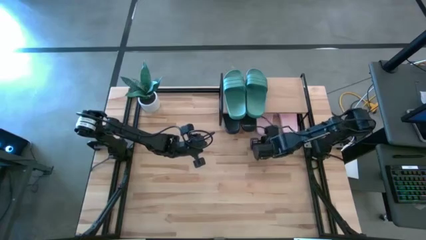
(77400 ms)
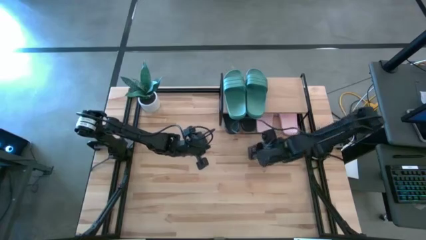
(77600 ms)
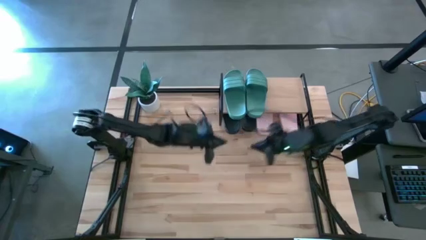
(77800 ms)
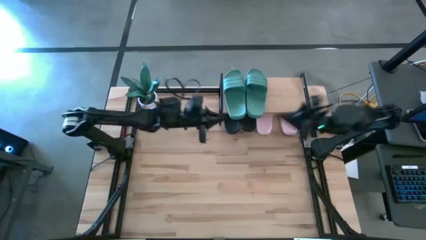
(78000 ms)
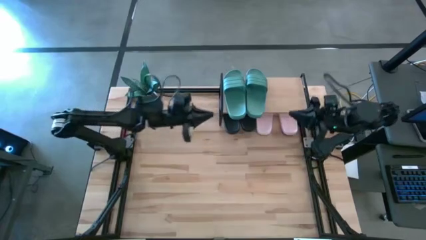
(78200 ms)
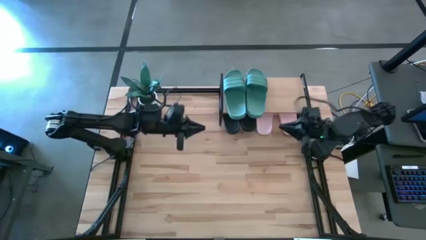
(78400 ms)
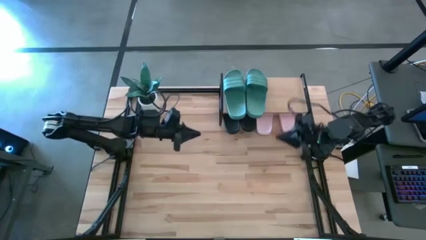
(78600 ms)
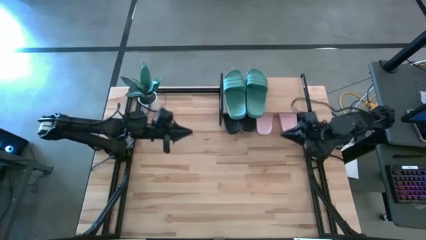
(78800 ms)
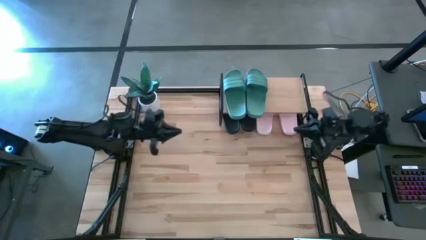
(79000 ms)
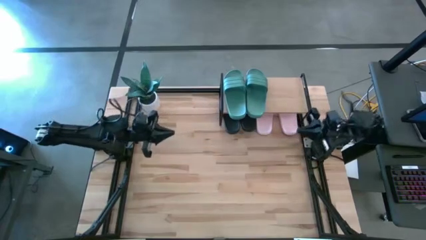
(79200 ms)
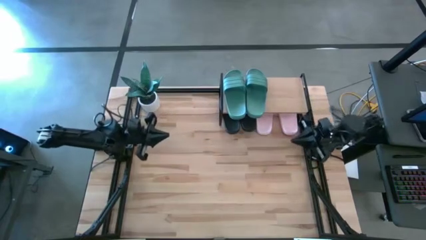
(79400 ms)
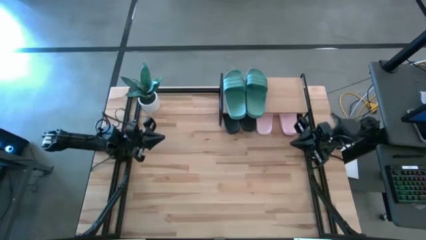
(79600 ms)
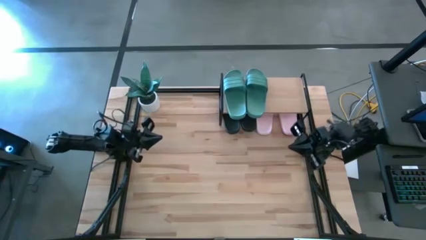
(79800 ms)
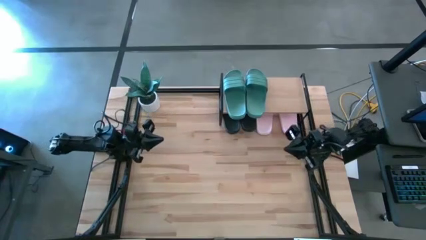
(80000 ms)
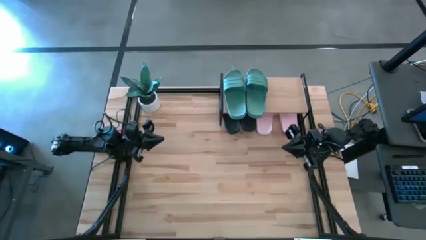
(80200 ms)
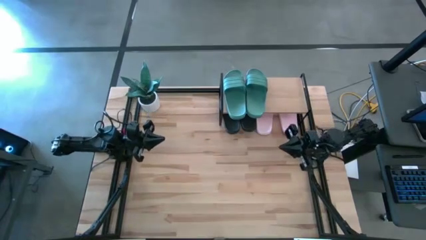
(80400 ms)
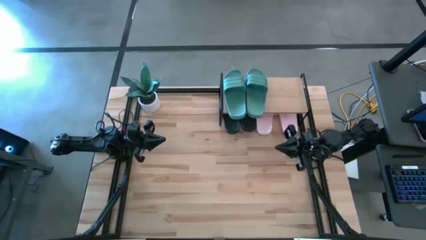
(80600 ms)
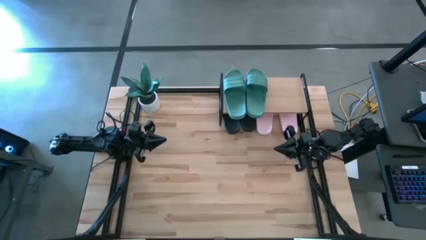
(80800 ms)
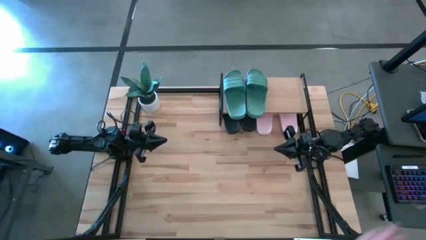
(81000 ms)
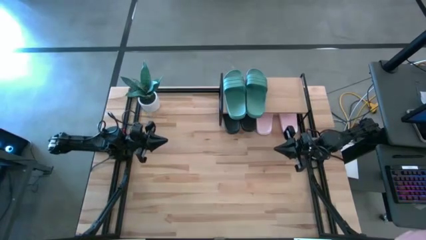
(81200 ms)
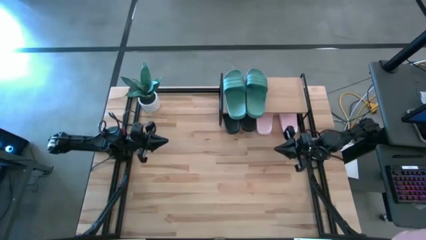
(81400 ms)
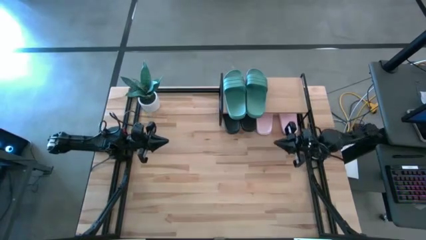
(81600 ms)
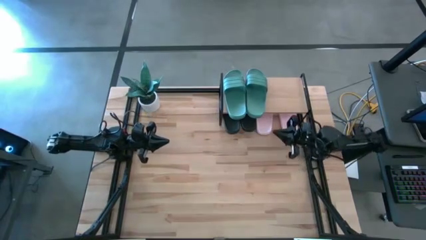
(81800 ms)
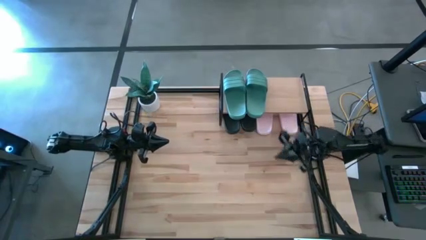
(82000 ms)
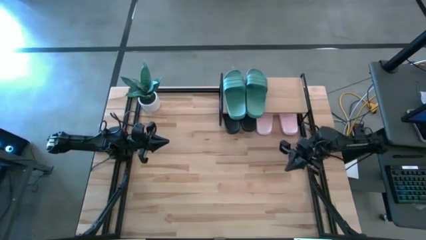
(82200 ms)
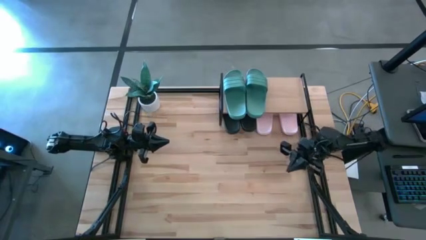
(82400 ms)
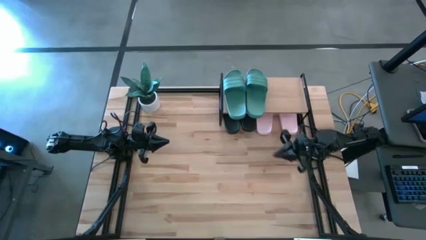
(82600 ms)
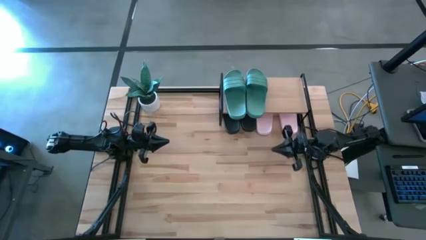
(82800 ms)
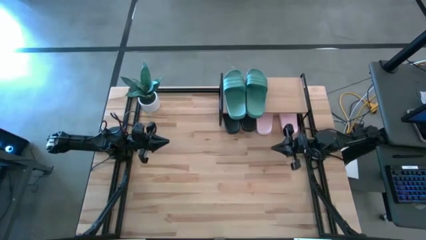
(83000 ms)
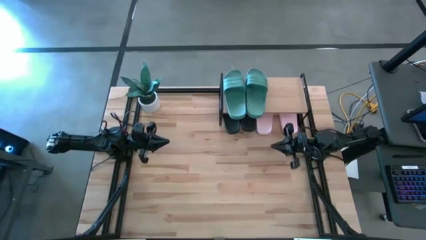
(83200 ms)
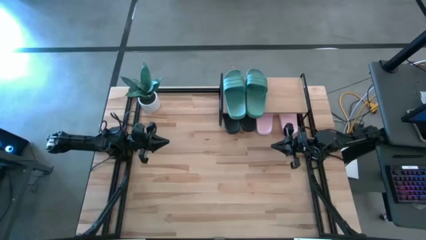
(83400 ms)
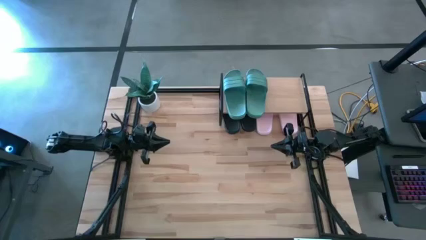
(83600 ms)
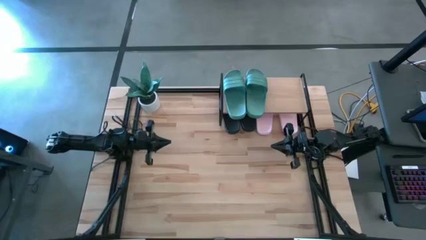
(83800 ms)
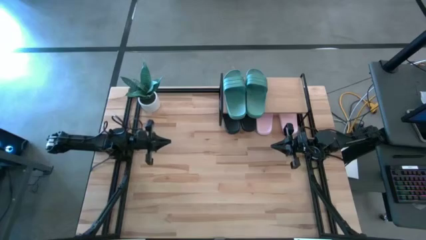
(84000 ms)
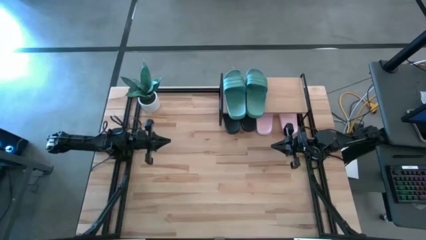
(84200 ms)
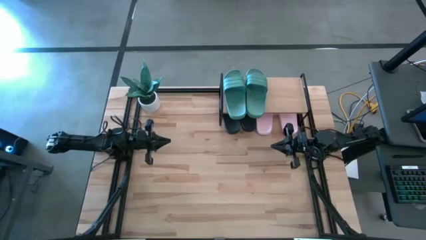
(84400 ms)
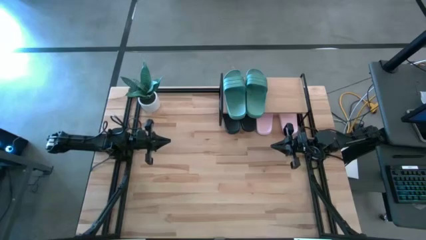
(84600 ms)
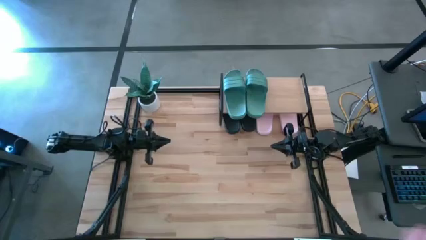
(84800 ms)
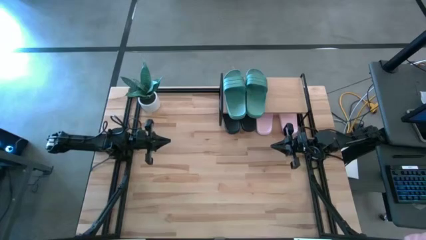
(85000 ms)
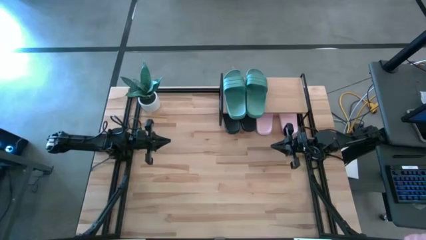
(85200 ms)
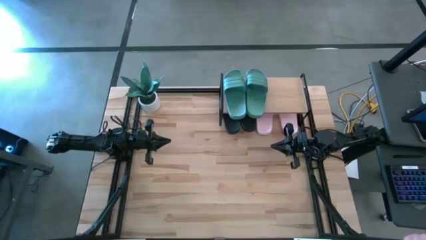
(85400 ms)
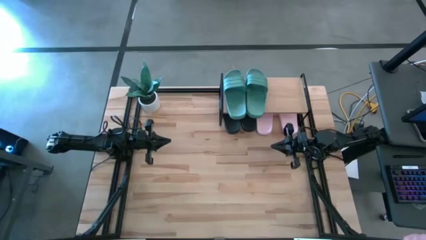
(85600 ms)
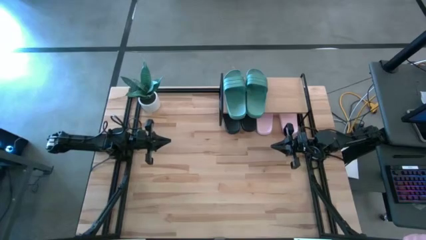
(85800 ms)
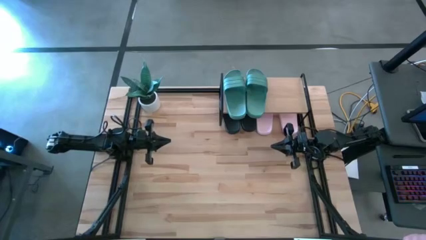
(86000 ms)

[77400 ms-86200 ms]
Task: Pick and place slides into the shelf
Return to Home Position

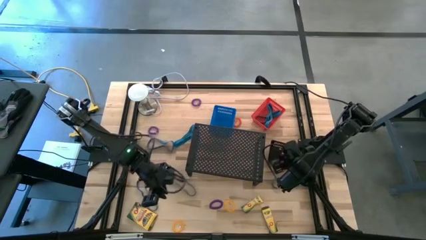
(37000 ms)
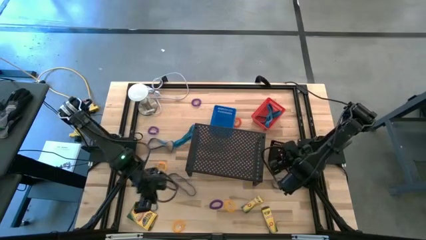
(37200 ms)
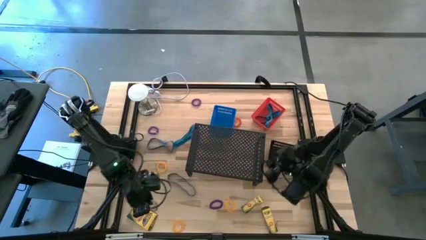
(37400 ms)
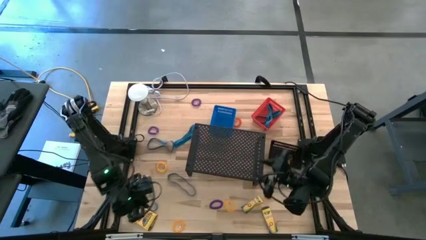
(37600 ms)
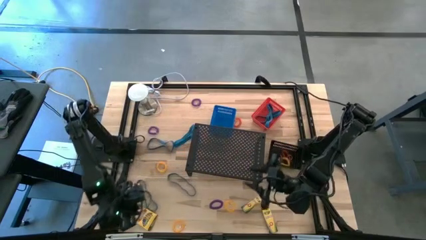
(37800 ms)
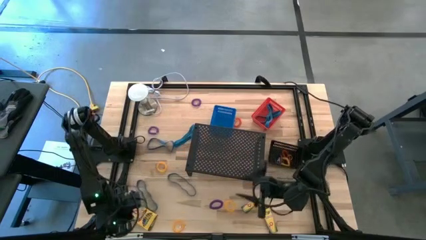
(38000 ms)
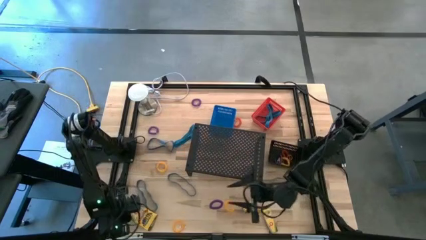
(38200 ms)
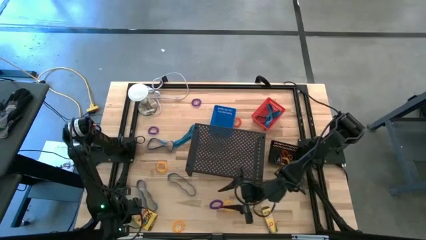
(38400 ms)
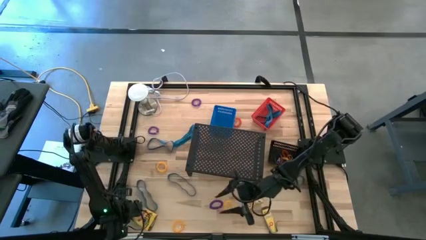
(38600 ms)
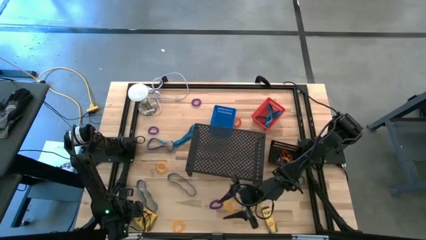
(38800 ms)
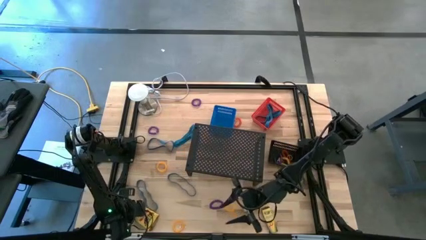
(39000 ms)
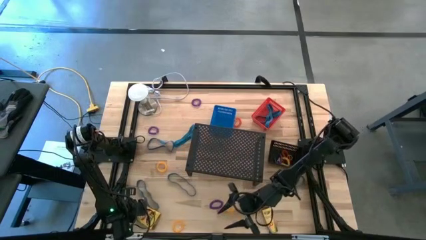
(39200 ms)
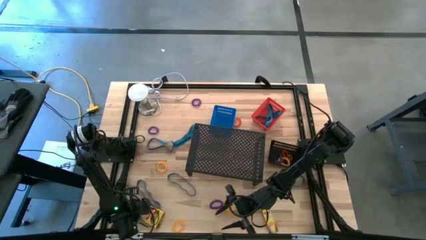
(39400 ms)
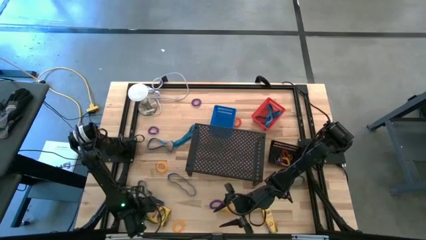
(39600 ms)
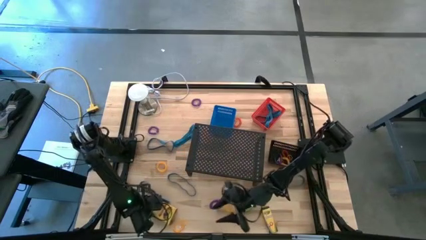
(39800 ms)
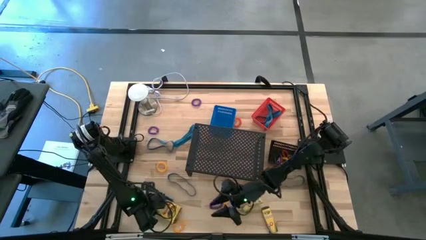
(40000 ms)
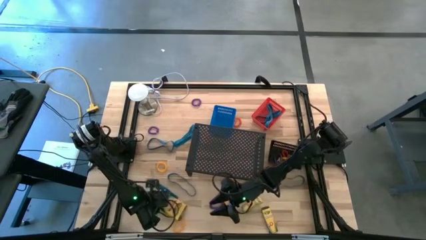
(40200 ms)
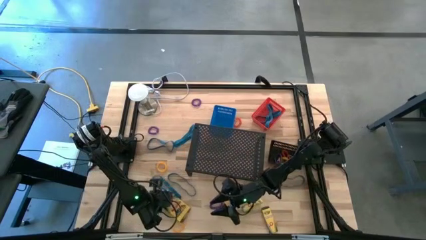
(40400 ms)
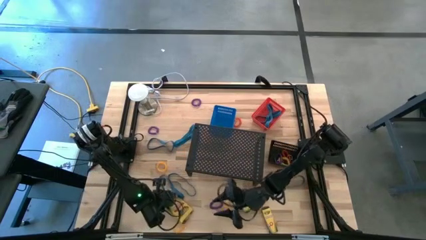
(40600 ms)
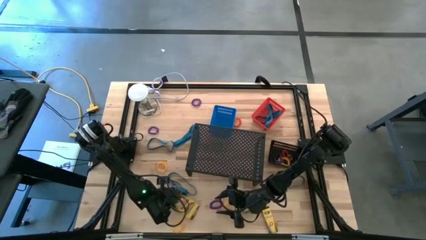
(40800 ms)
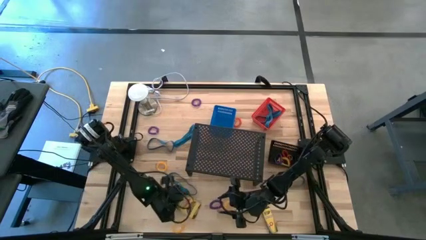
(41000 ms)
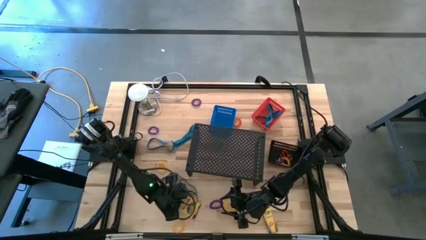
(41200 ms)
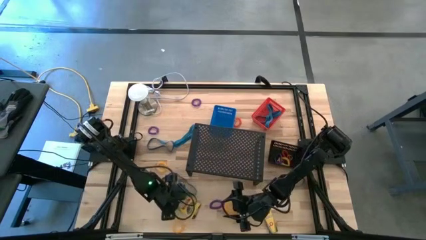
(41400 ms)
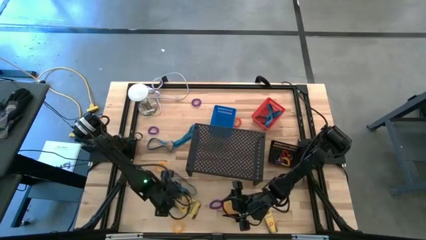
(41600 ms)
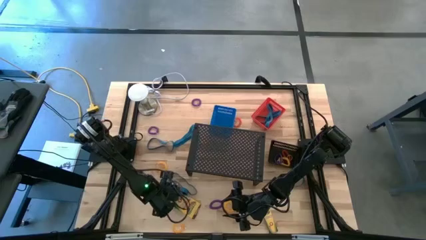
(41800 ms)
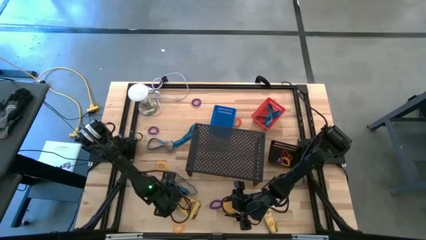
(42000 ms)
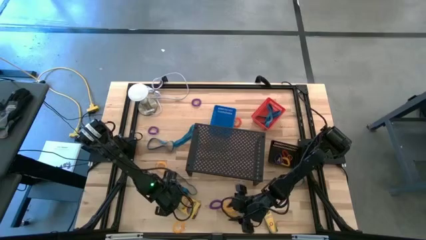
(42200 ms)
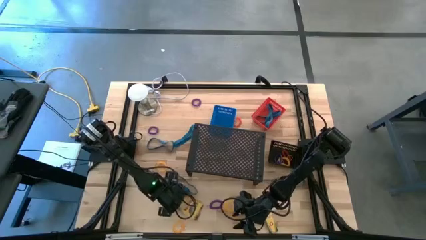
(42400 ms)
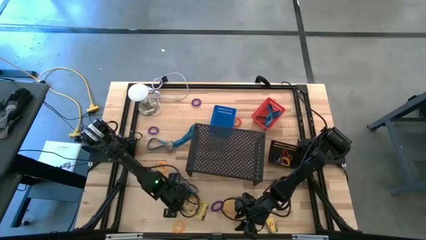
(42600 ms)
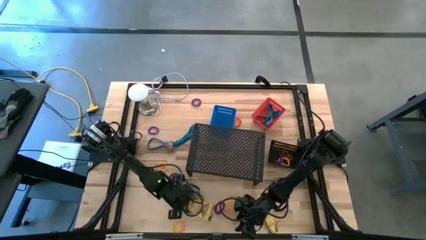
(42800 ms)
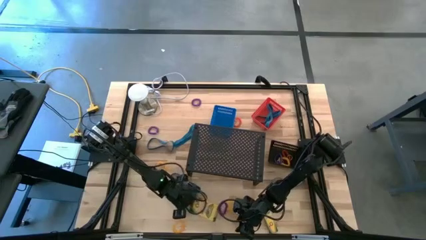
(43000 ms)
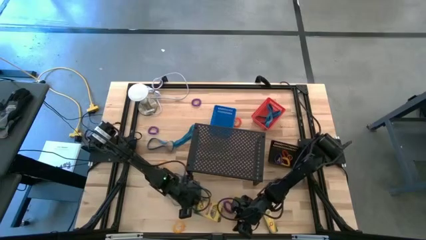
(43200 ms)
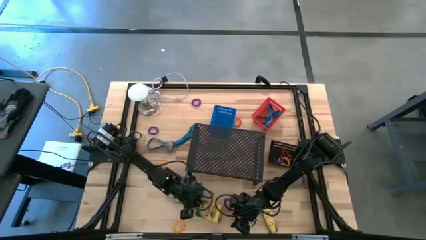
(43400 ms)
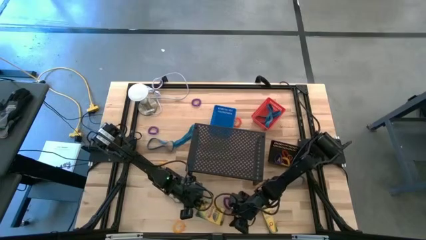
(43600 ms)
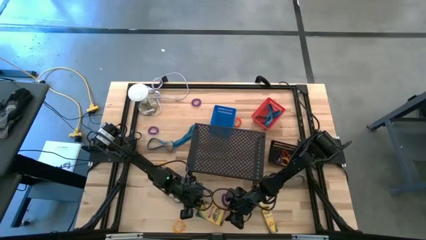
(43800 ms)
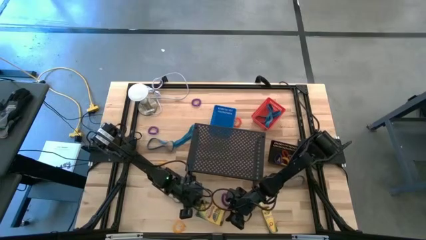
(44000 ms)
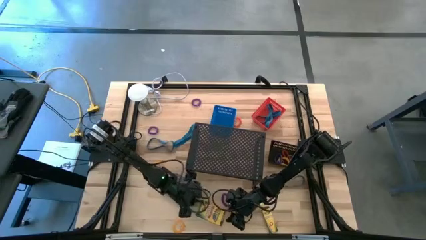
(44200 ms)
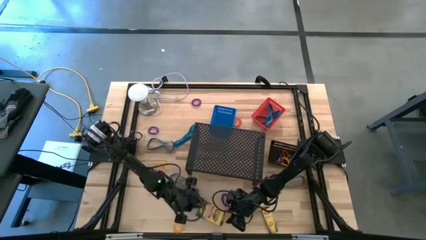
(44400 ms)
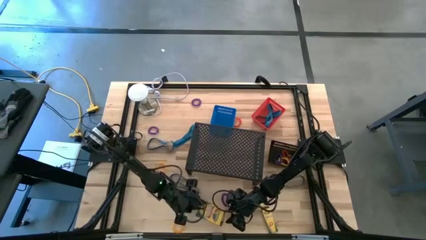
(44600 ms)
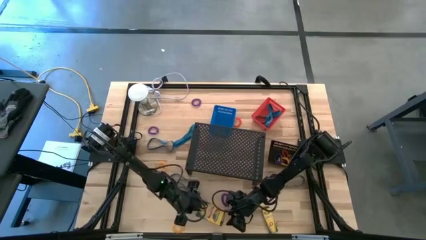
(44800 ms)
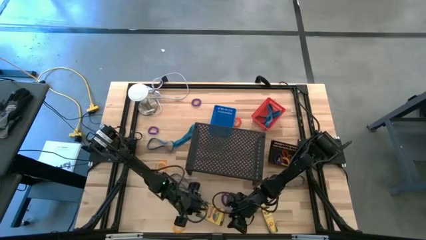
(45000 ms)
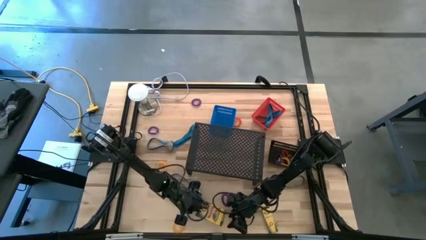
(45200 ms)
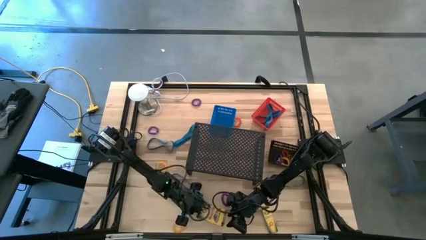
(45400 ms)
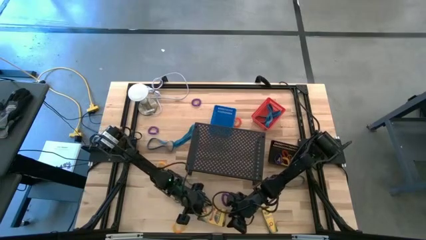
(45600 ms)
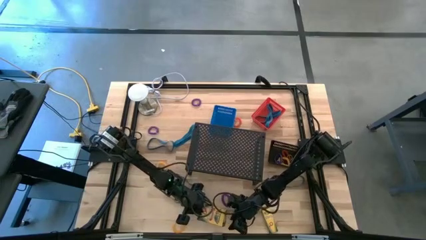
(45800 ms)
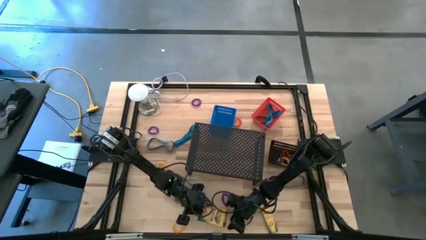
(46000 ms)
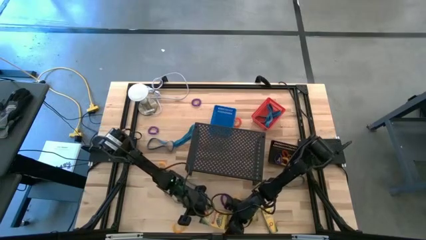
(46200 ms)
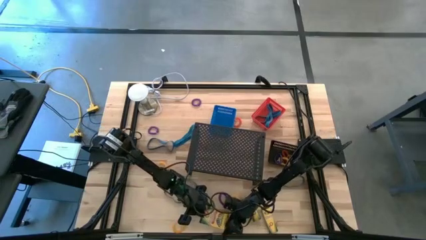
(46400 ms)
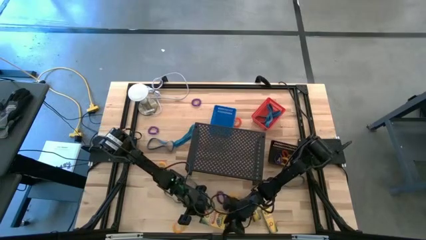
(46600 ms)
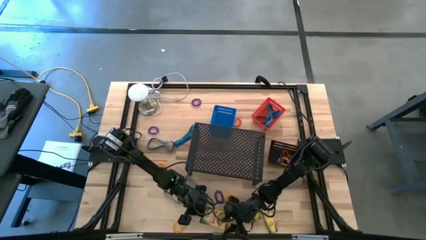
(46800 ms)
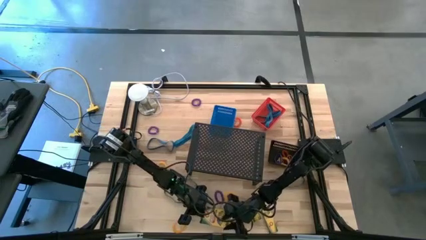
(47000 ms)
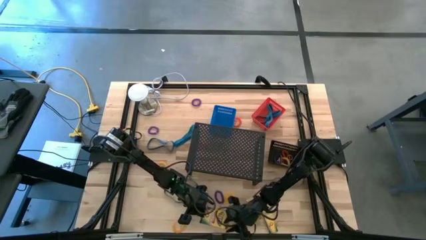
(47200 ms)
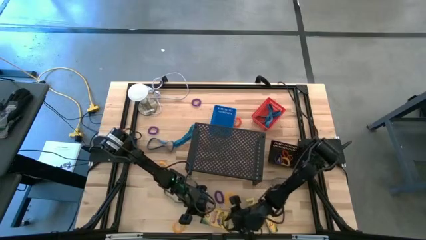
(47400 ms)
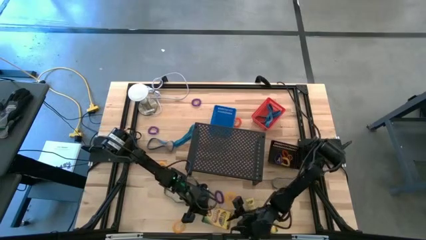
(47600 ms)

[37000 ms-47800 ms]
Task: Pick & Place Office Desk Supplies
Put the yellow crayon box into the blue bin
